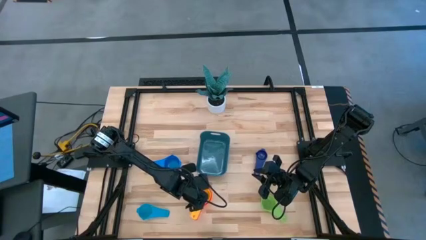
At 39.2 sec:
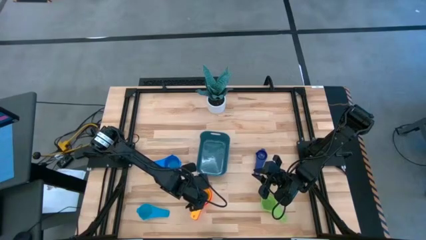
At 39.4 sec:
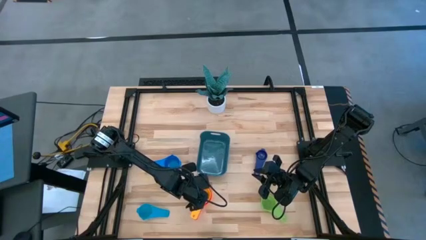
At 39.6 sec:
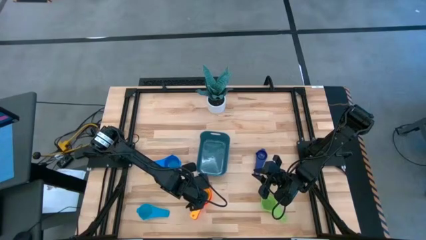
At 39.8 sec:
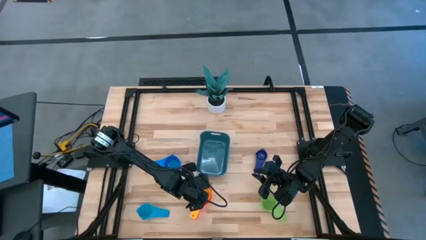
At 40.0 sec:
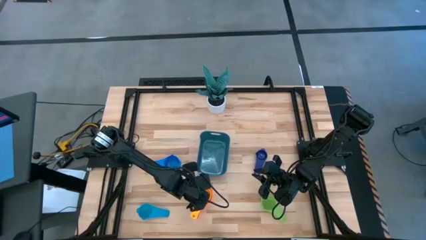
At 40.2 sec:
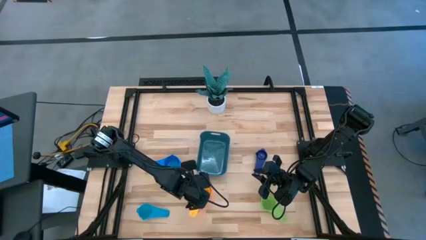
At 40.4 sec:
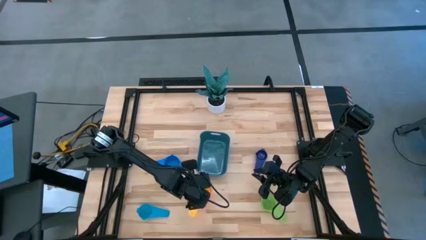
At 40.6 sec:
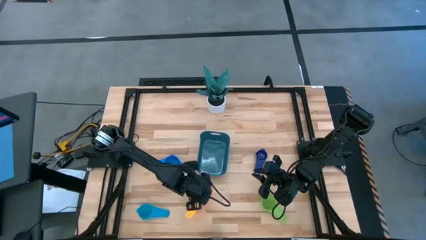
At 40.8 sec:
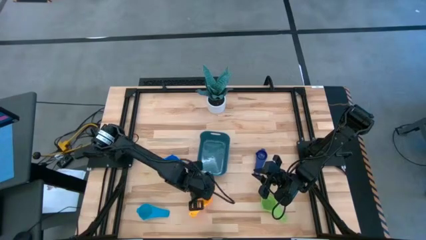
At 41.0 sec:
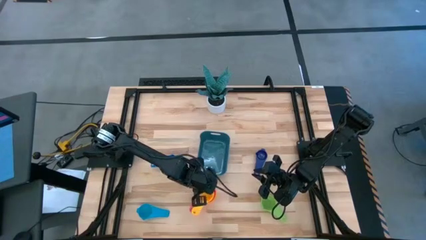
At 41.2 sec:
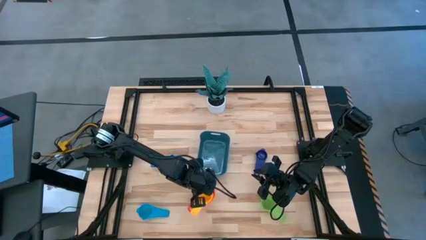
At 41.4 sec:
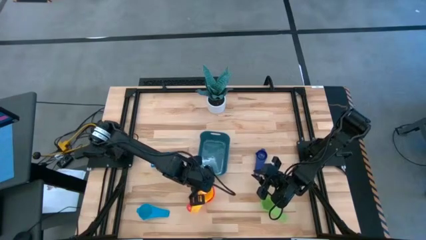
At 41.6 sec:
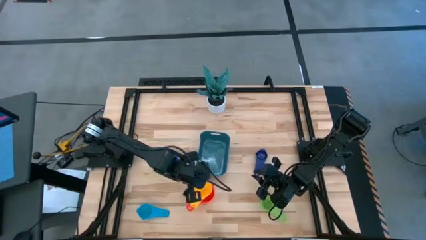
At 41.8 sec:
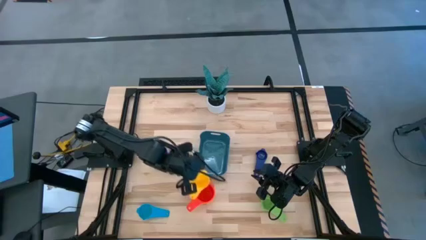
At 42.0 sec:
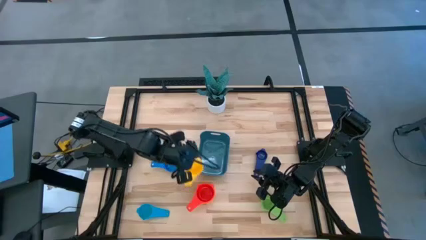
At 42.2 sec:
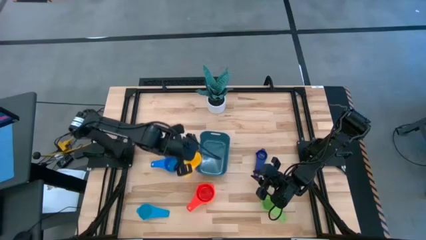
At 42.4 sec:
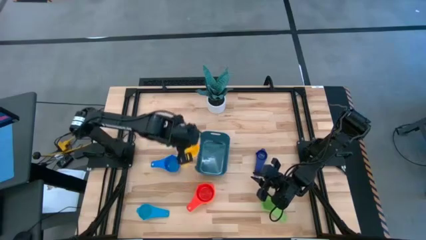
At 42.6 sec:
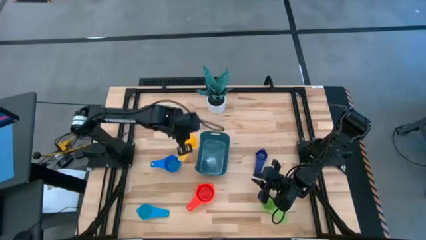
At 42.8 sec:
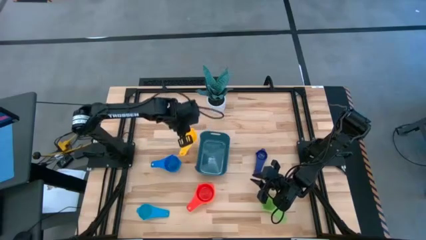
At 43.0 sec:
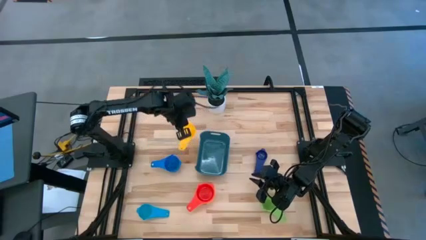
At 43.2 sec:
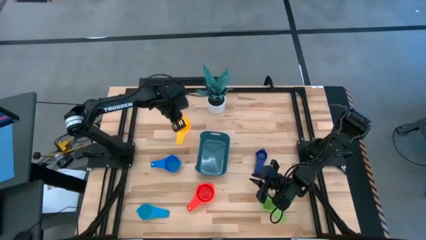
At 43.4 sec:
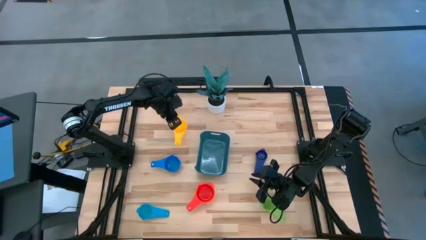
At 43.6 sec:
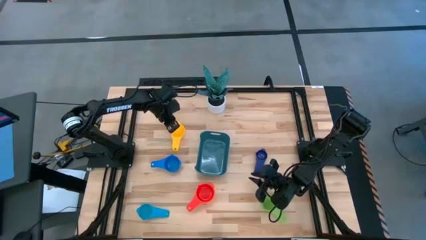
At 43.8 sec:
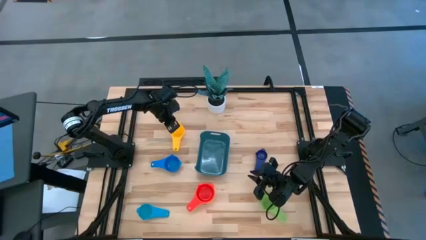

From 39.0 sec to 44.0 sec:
Task: Nest measuring cups in basket
Remove the yellow measuring cup from the stacked measuring cup

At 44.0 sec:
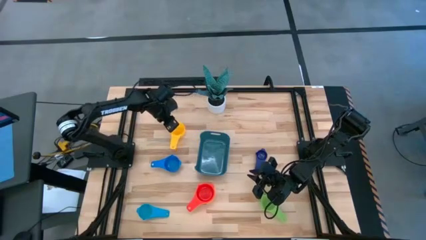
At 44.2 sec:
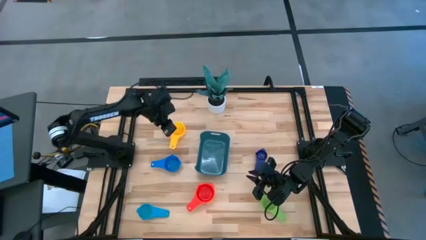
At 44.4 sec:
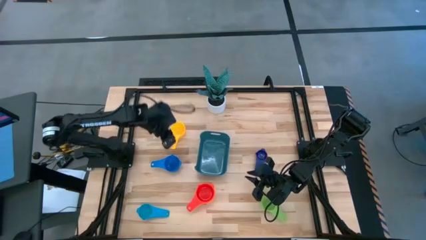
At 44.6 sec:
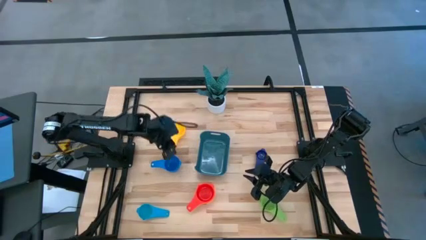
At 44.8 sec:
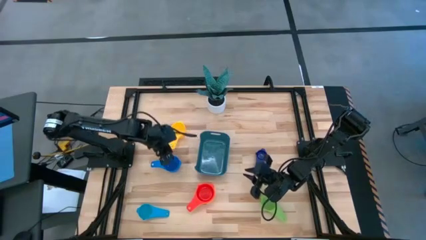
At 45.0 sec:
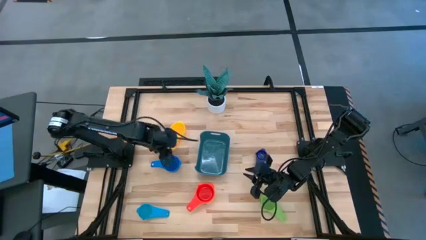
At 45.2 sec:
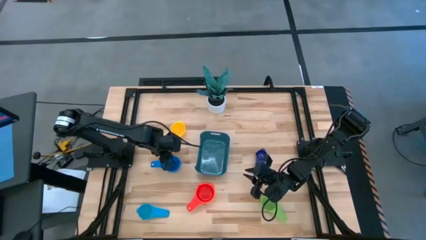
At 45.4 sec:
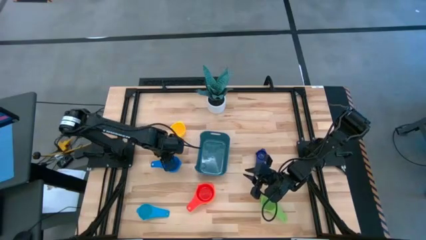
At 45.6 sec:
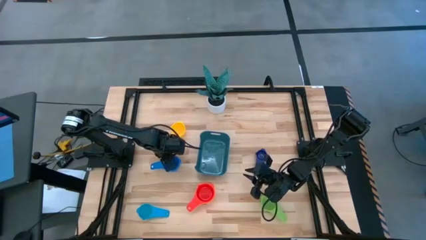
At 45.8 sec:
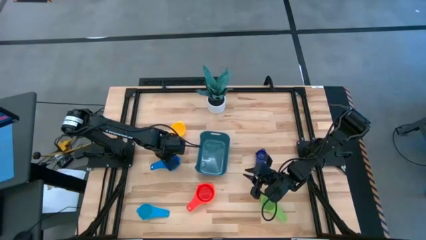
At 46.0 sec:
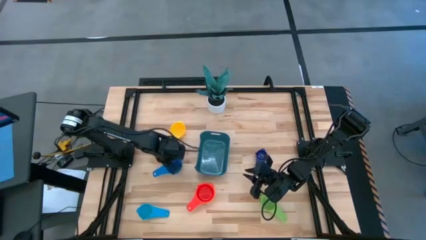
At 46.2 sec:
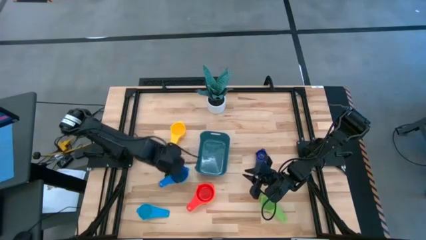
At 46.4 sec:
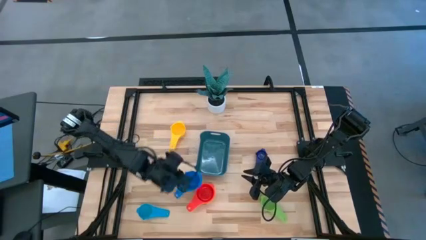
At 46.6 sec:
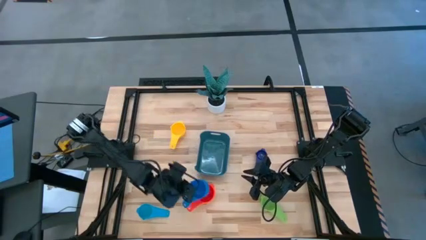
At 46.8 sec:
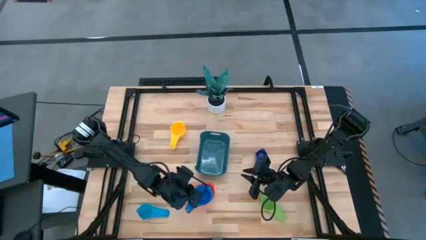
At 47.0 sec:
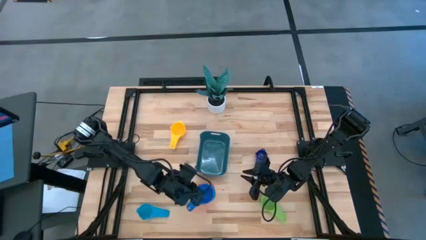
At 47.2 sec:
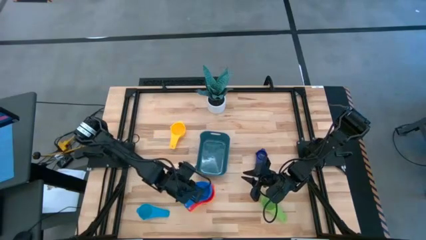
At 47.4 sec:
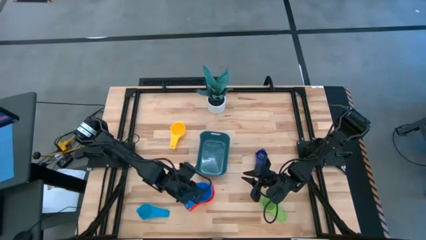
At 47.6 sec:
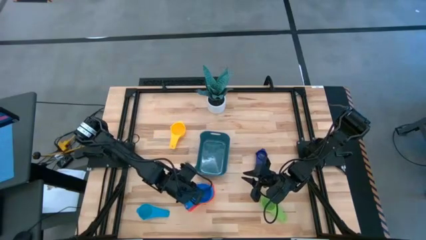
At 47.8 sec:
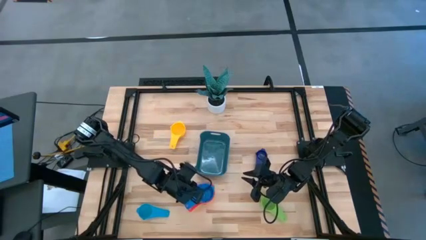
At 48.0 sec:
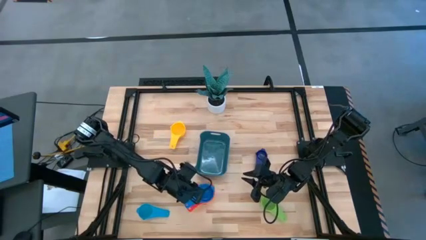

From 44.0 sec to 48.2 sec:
Stack the blue measuring cup on top of the red measuring cup

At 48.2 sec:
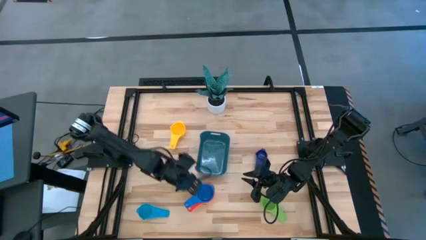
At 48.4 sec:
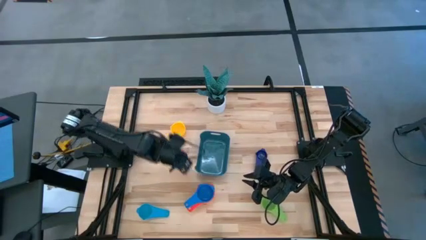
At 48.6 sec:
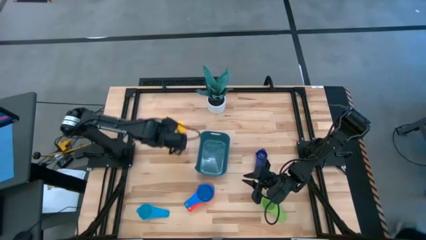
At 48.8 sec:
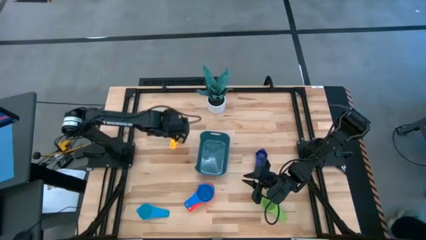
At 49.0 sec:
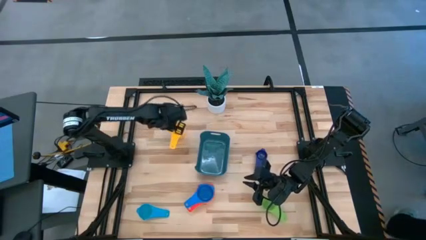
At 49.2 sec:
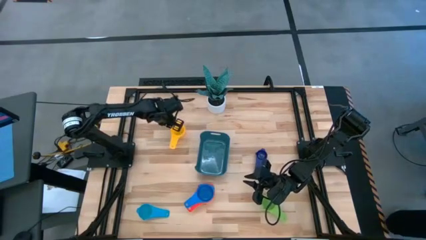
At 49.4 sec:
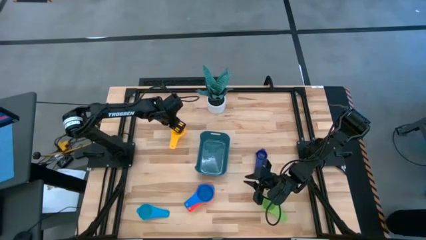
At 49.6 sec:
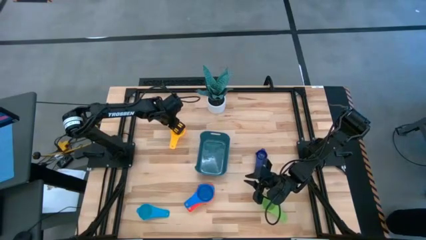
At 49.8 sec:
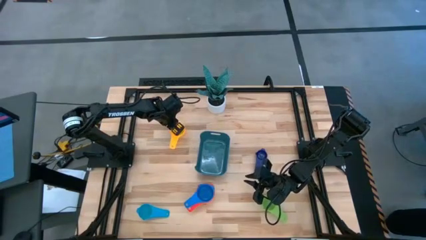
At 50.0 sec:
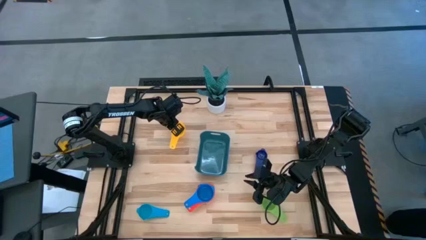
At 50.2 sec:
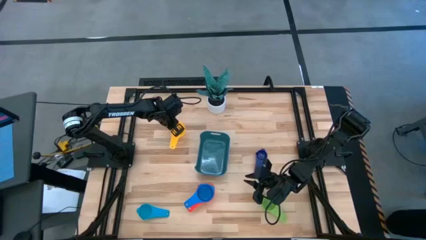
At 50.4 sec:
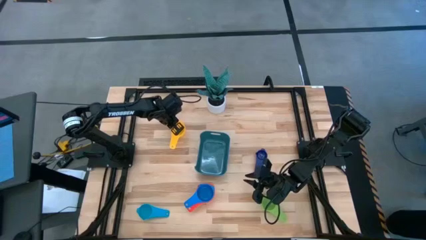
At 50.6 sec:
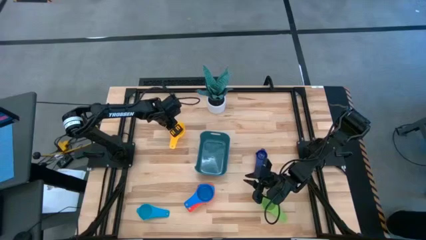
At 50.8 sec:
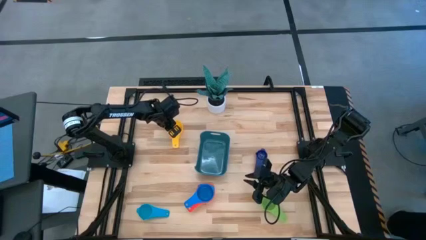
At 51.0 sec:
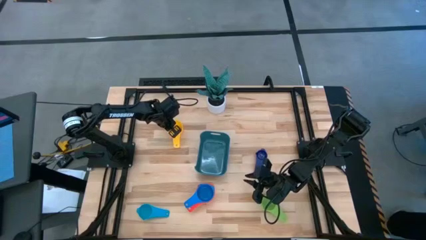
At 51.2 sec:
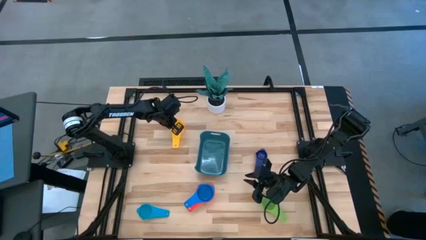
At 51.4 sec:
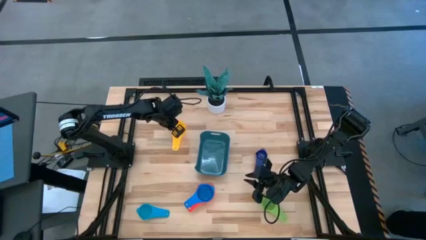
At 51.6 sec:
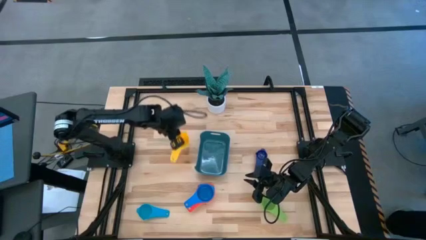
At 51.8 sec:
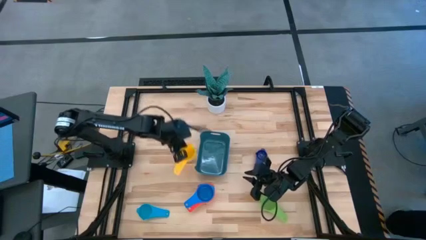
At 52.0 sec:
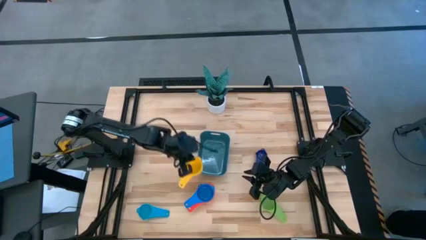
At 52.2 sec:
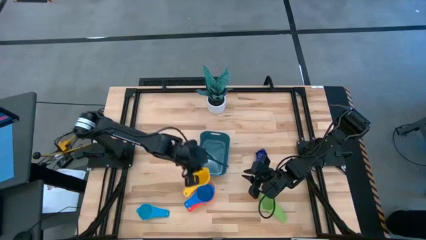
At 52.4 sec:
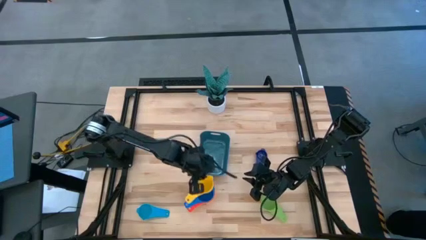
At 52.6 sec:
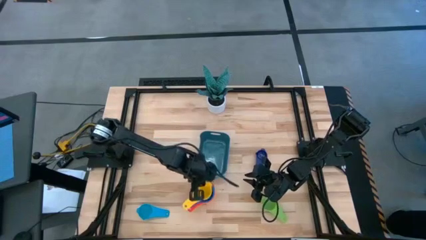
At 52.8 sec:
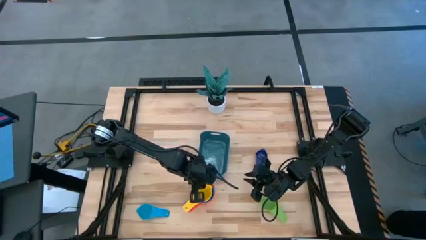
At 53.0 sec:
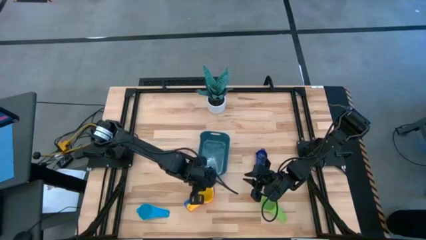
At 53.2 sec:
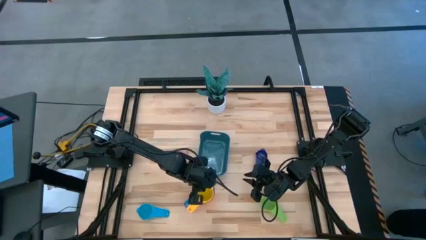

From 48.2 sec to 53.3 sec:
Stack the yellow measuring cup on top of the blue measuring cup
